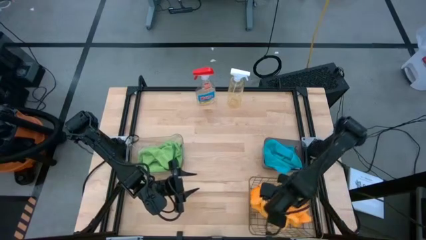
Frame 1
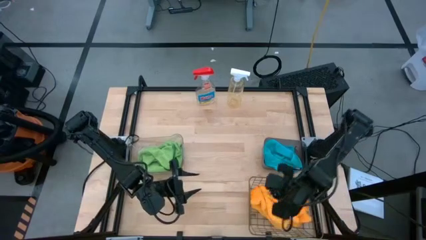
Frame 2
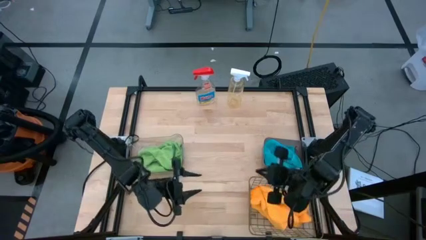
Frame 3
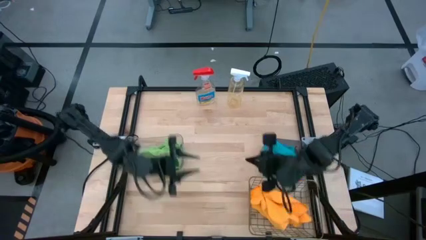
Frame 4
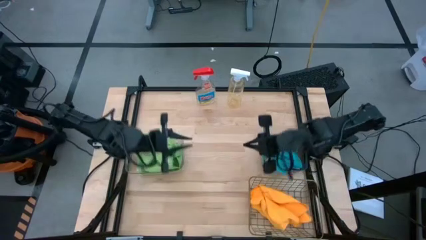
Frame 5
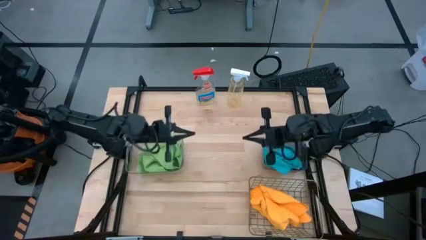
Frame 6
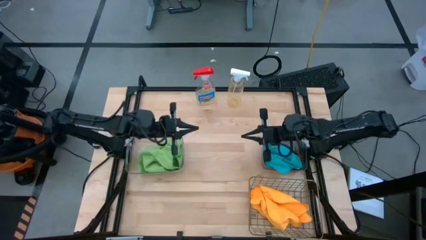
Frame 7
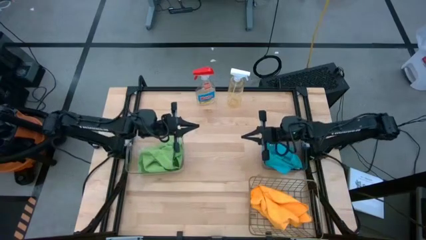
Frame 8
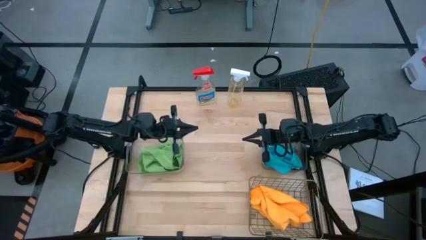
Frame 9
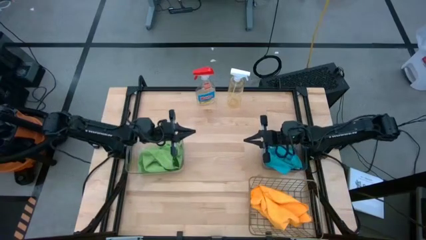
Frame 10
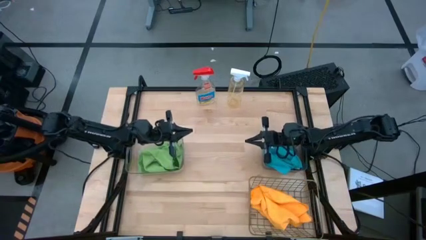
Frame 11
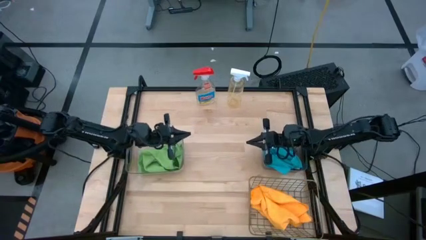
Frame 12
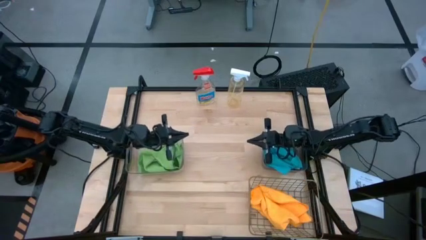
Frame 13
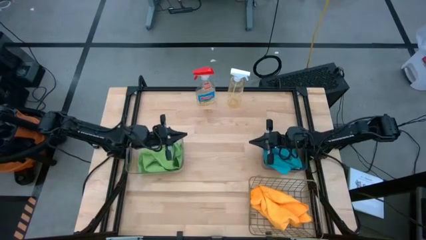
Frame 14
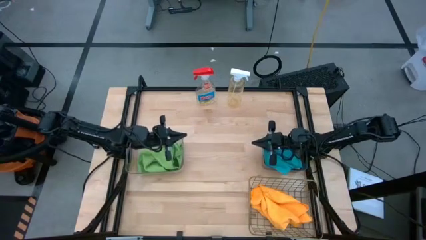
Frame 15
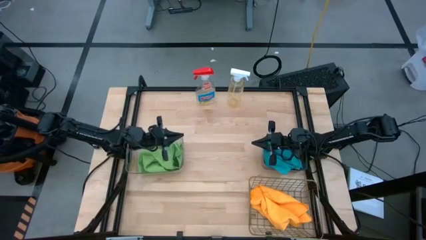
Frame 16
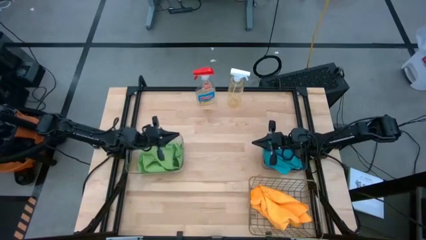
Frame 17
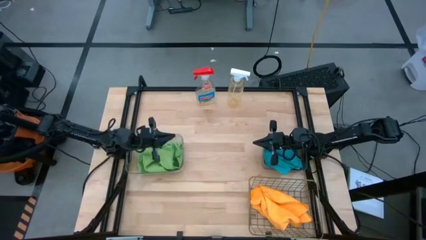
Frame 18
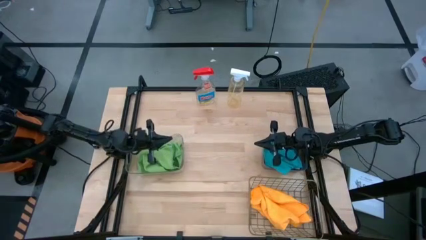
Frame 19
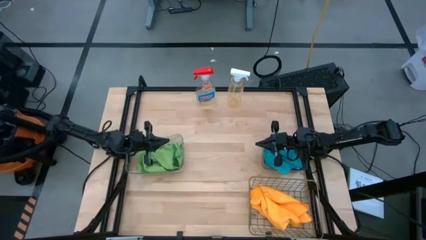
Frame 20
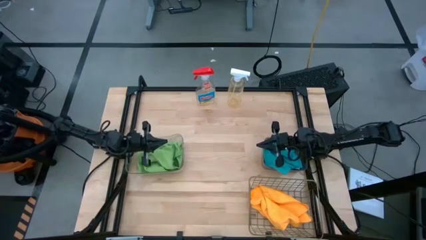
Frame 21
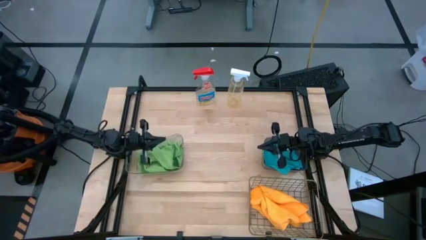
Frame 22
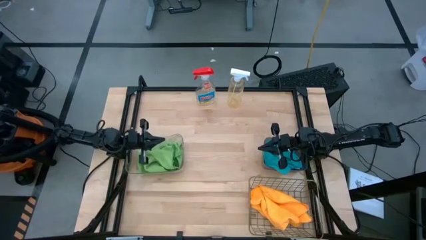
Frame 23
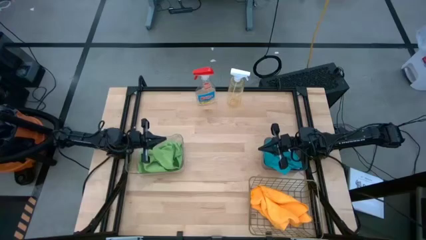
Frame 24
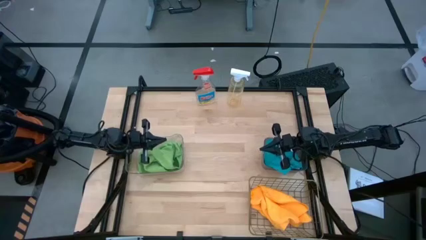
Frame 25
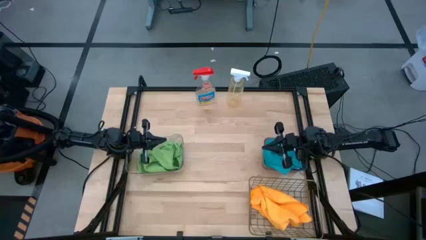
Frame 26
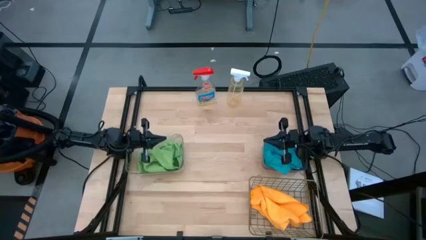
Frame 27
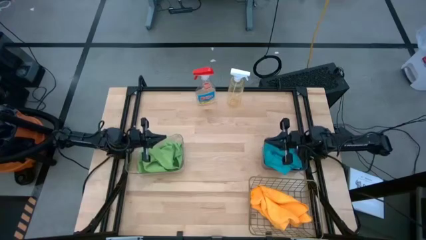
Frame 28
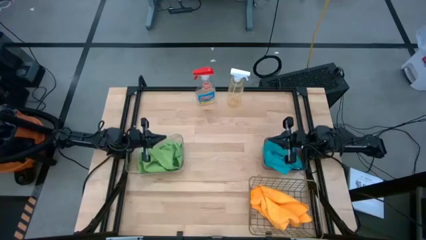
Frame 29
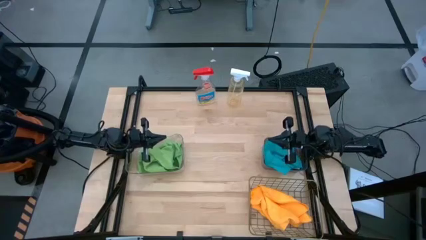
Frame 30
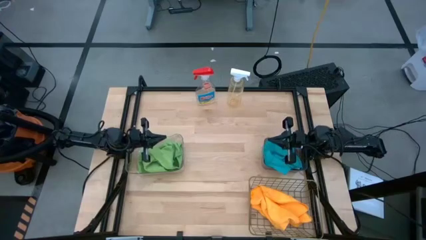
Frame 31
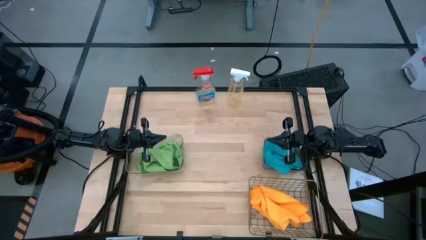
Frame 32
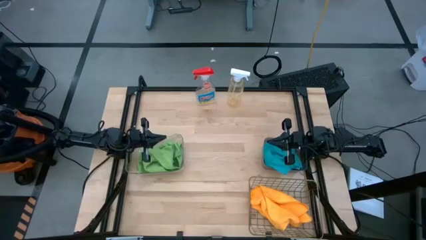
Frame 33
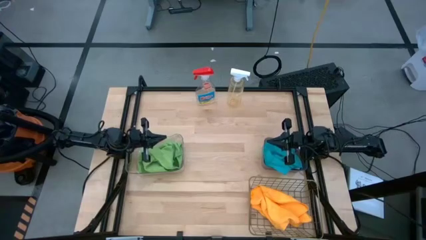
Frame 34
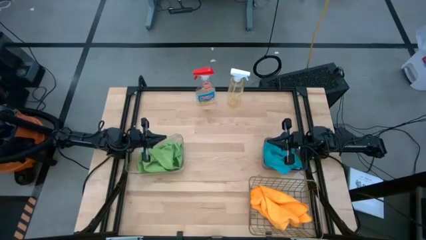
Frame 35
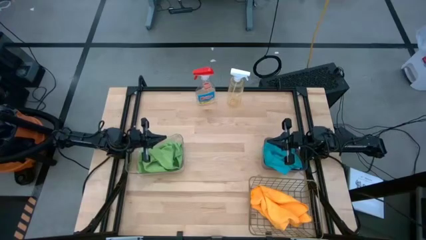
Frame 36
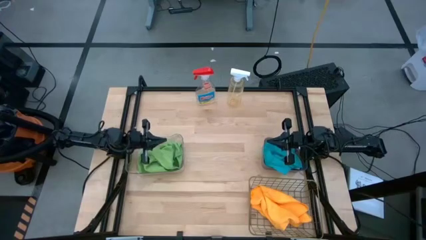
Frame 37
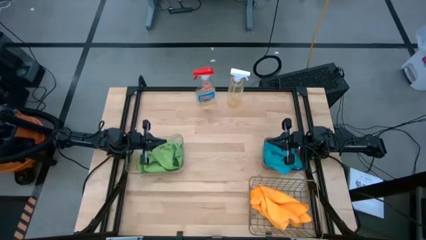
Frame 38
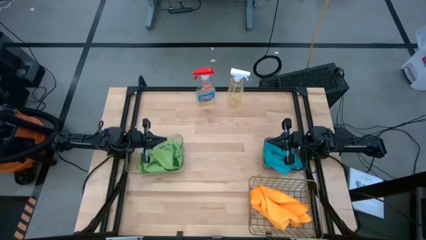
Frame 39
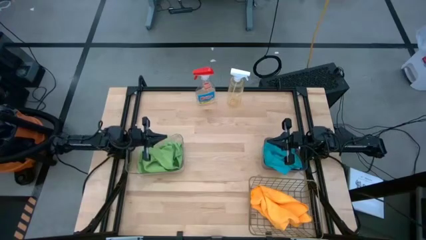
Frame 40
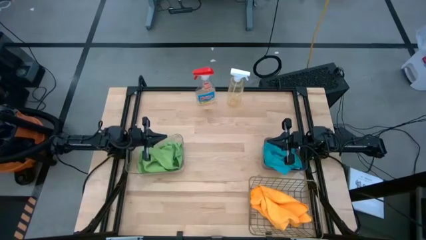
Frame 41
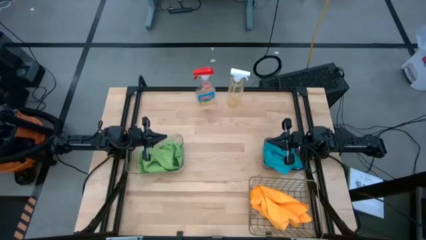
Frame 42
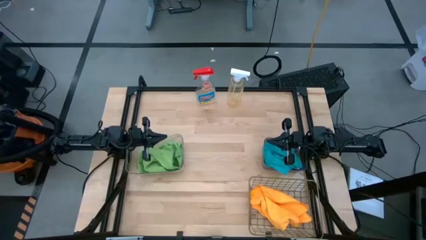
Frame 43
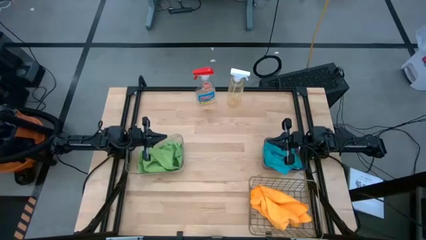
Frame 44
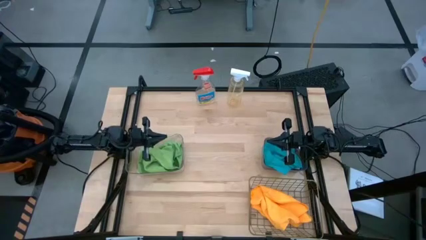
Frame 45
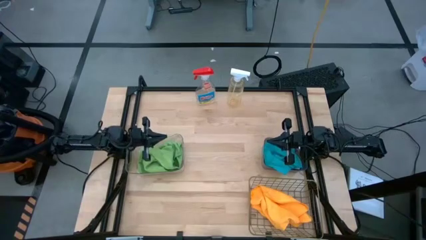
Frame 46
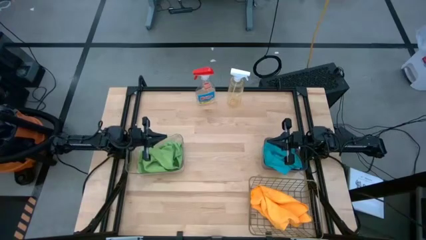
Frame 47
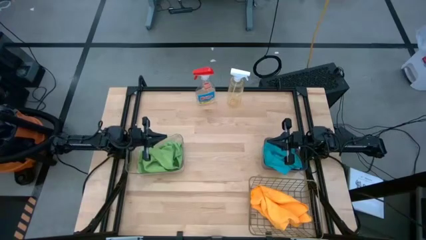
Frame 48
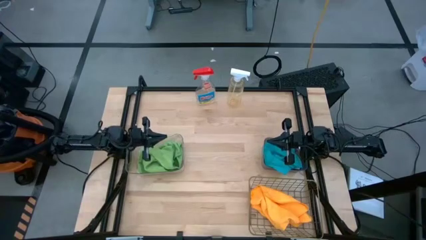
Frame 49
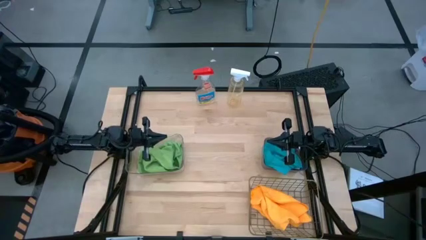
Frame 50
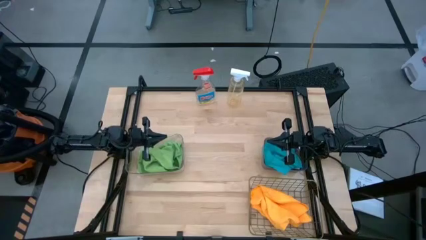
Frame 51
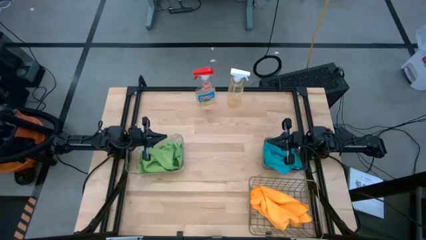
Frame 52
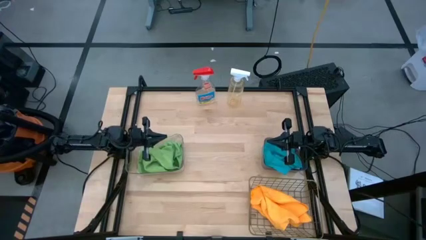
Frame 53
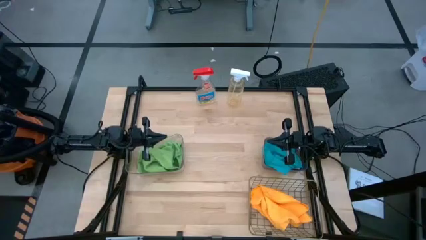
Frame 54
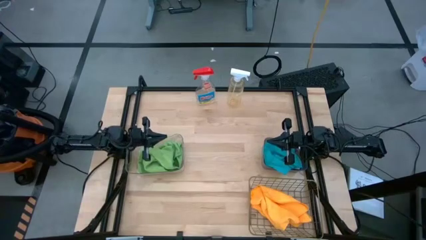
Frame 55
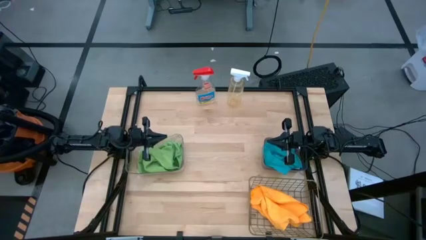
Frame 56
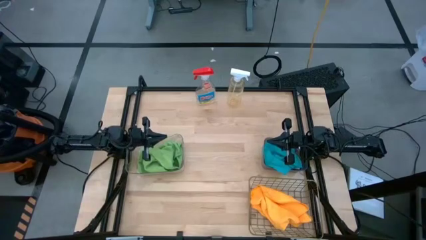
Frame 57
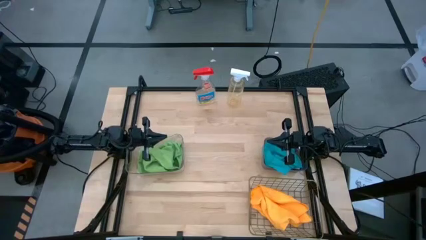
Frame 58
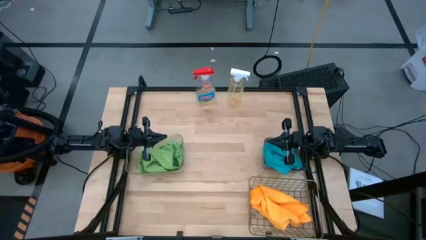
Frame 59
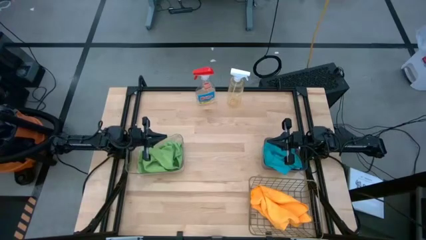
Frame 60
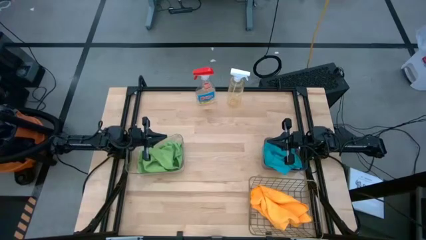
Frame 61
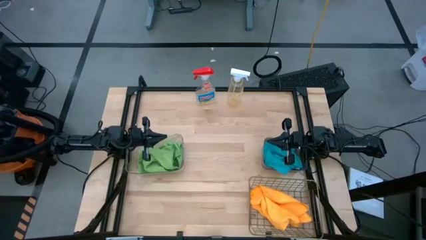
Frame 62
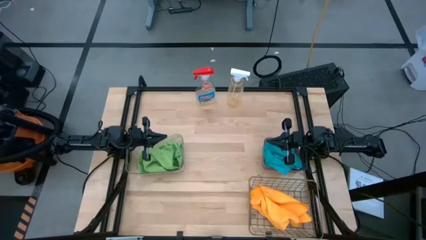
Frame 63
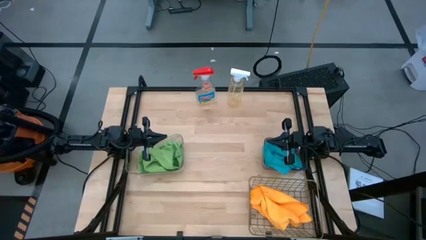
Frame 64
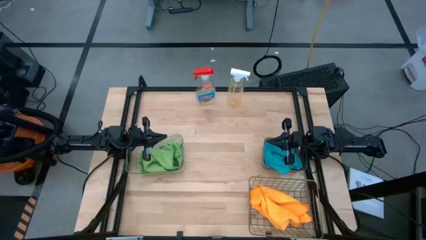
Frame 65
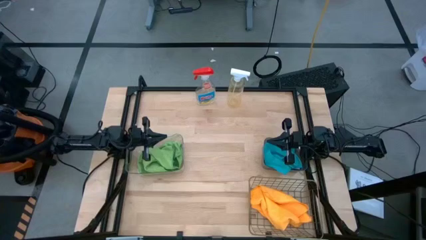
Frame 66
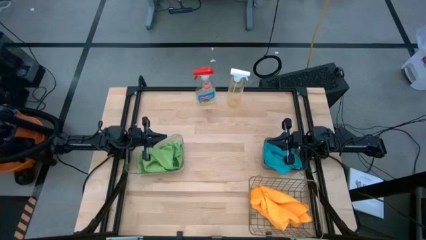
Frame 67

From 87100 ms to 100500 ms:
Task: Sort microfiber towel by color & place in baskets
Return to Home Position
